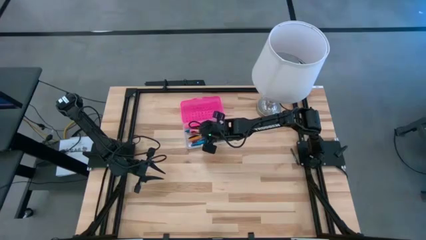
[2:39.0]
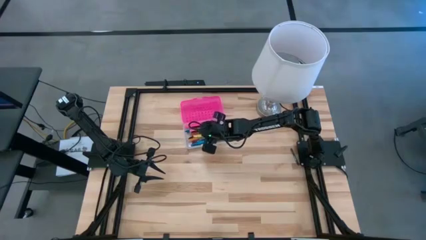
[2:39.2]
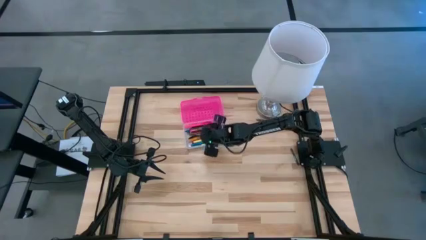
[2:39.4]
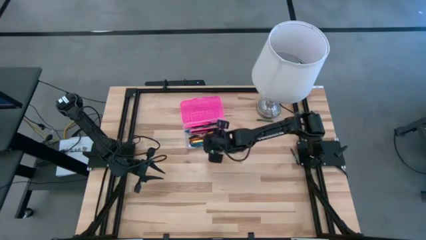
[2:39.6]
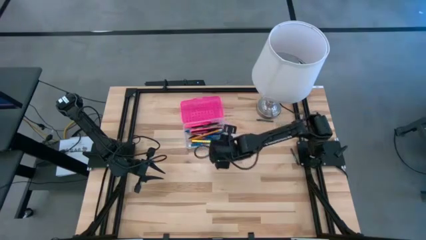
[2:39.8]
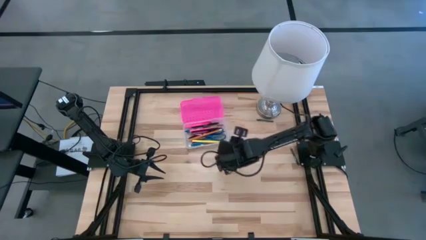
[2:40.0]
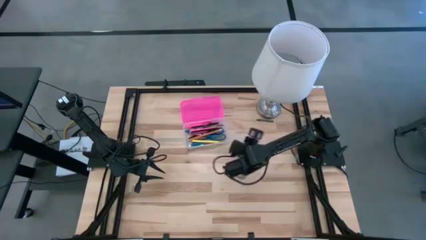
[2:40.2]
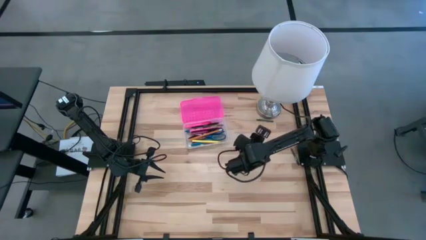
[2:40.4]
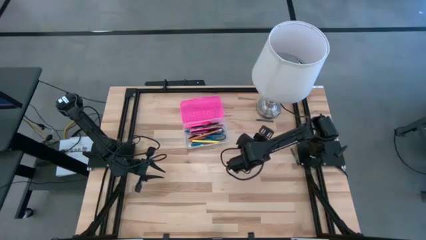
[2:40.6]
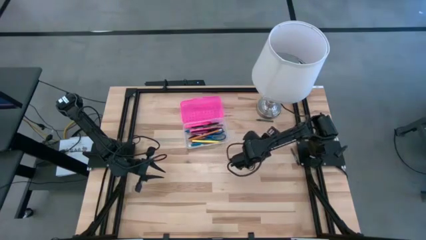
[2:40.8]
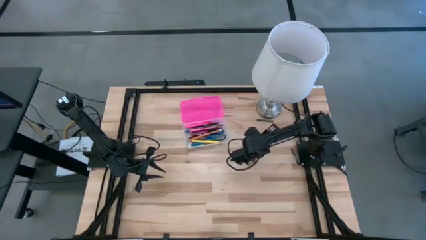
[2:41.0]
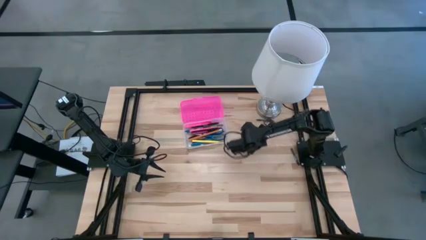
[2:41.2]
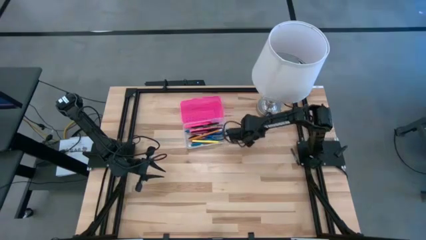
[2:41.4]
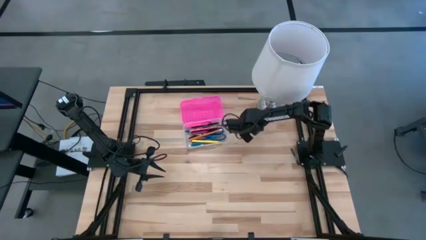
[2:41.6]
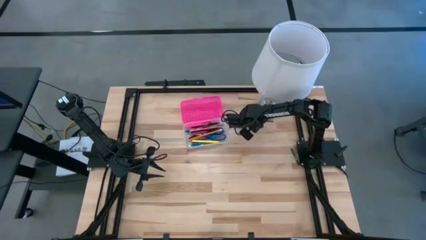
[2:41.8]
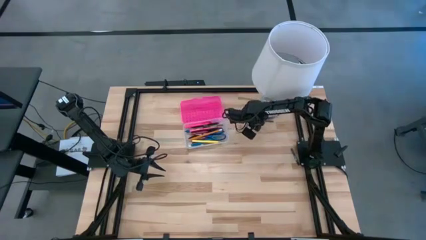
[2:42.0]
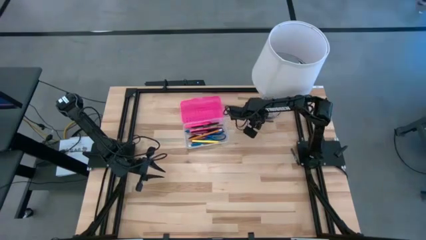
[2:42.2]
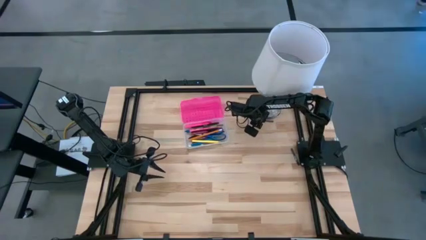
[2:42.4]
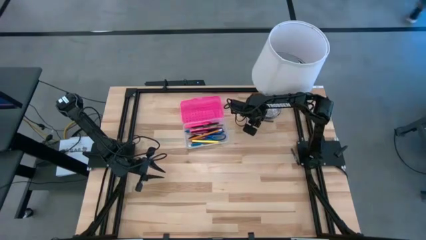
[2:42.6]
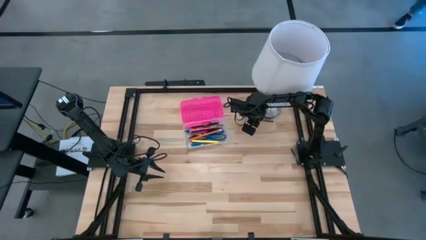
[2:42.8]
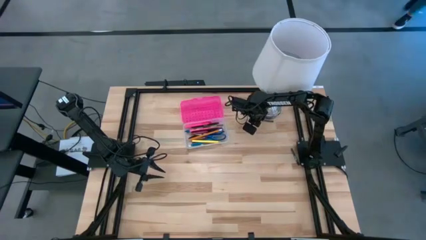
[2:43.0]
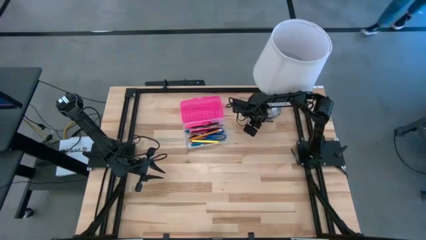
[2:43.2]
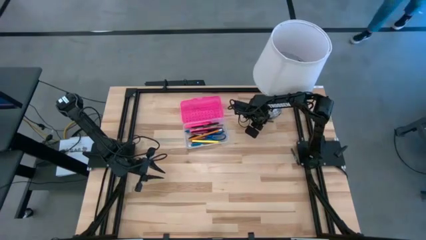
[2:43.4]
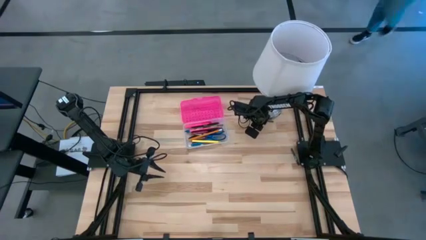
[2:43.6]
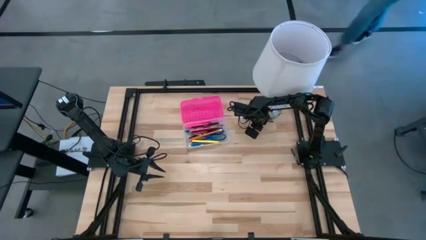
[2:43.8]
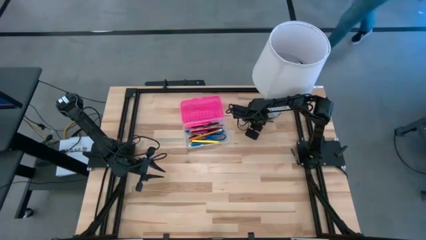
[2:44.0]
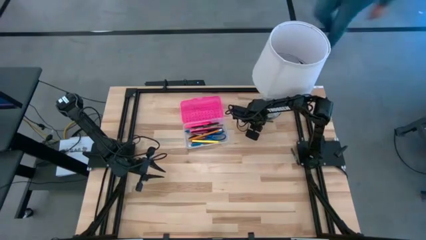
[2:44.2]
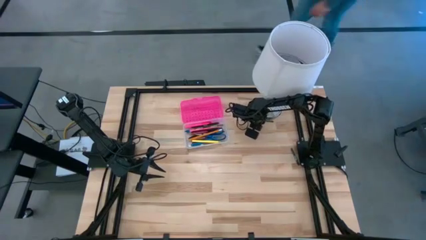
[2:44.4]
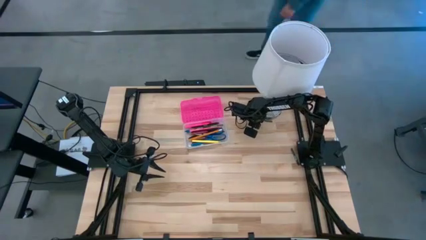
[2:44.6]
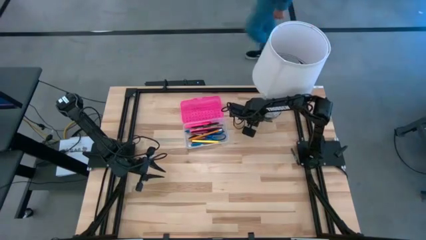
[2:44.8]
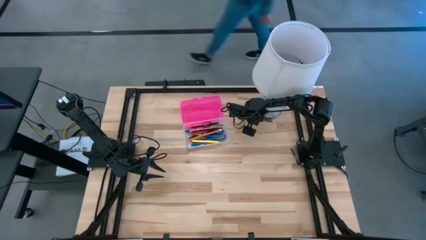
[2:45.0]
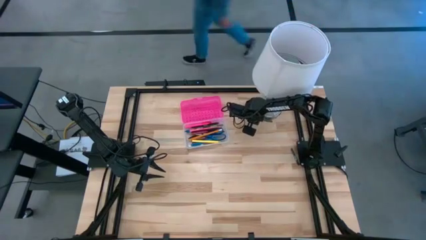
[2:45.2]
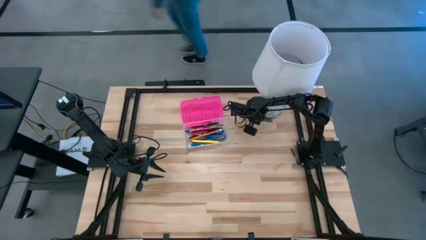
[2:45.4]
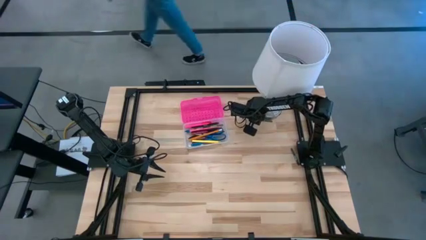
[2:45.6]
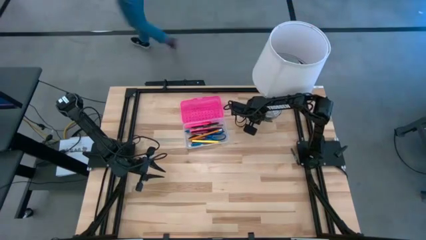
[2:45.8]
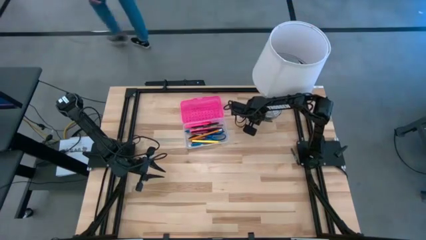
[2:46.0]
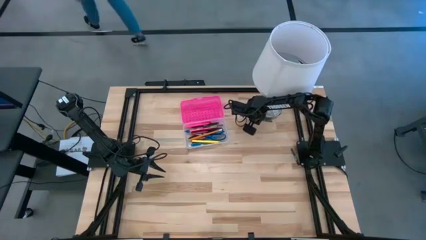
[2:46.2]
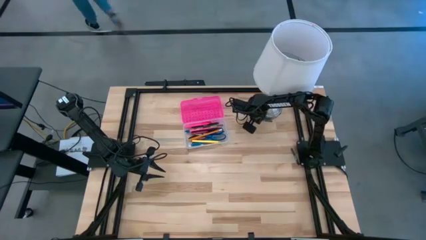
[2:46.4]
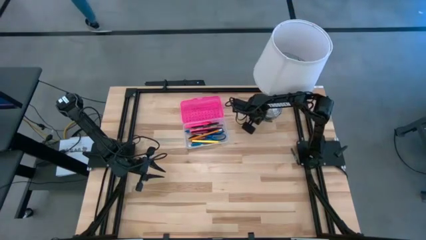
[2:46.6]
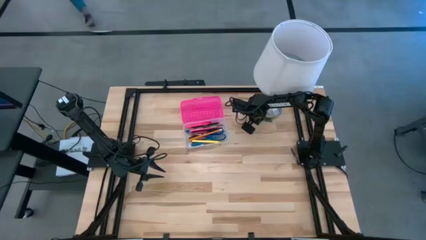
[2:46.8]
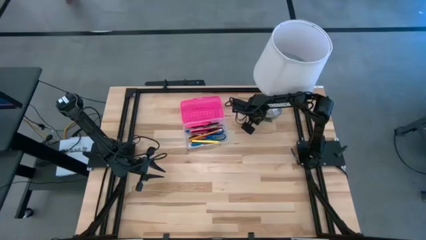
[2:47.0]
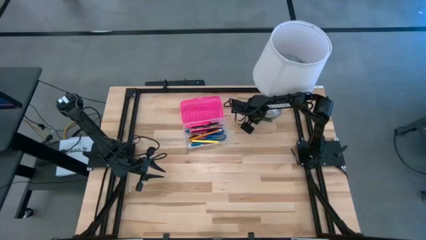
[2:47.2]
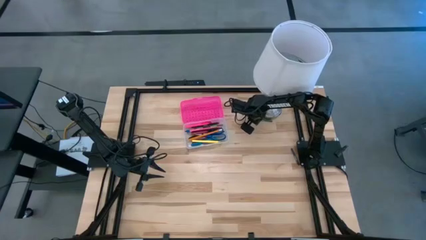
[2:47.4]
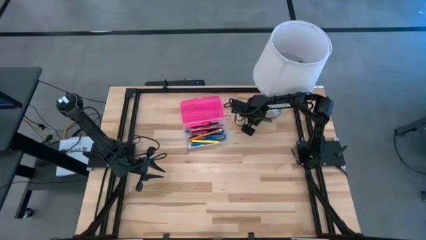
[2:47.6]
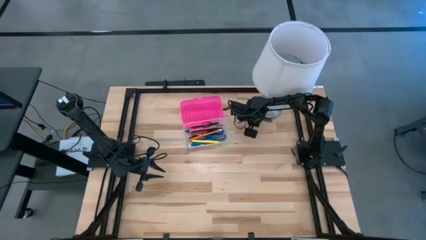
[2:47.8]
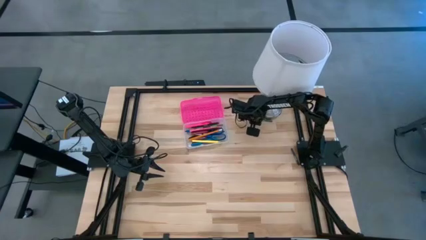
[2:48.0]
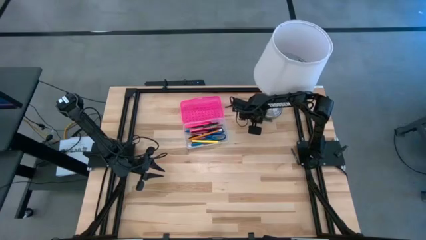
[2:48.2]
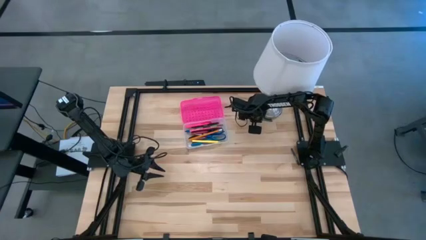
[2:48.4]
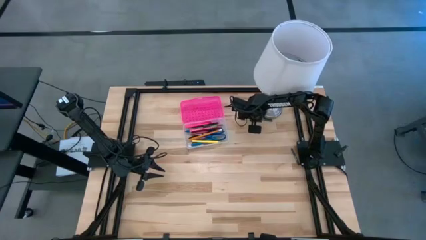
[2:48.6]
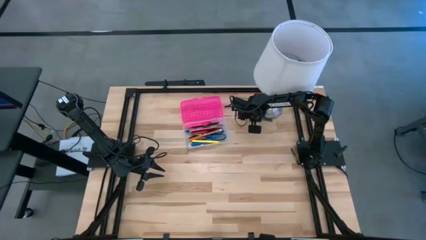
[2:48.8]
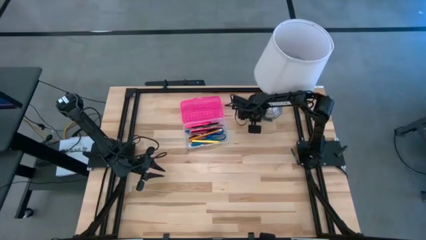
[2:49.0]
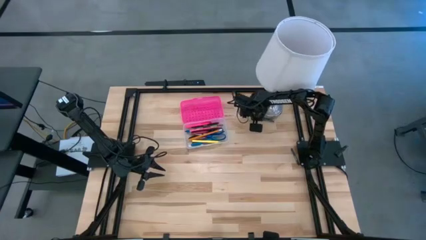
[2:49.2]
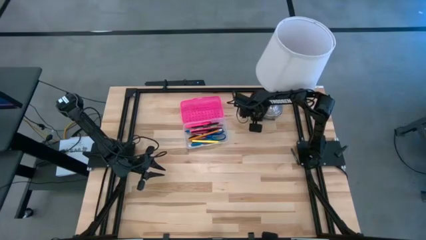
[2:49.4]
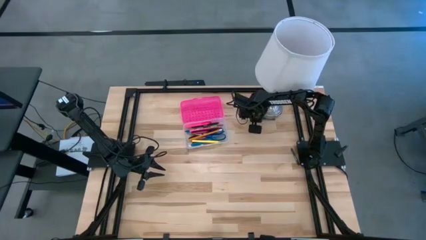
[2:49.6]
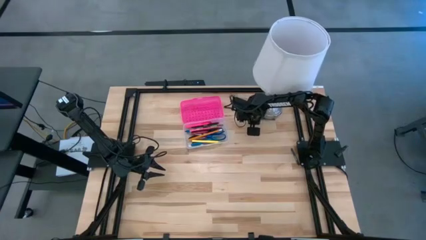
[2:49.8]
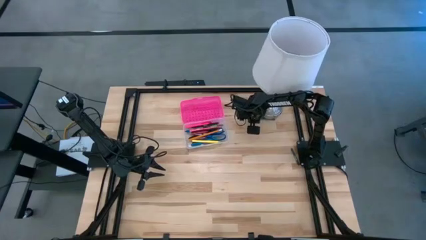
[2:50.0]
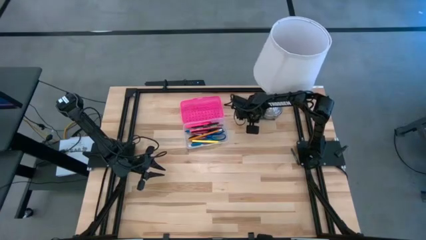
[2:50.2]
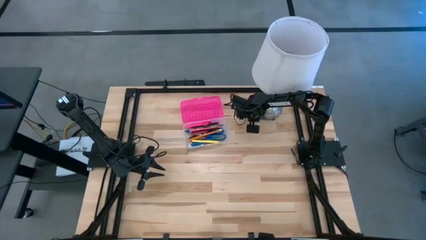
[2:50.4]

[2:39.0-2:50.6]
Task: Pick & place school supplies into a supply box
Put the green crayon into the pink supply box

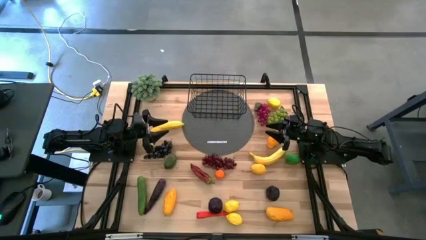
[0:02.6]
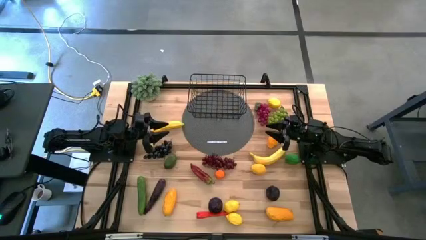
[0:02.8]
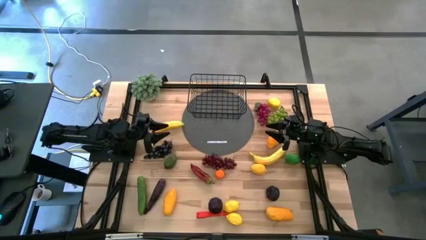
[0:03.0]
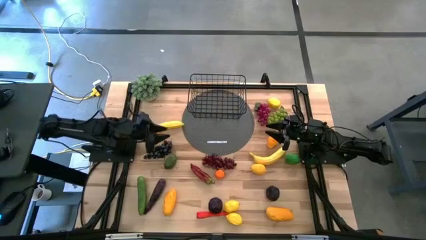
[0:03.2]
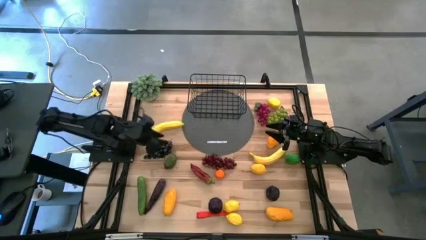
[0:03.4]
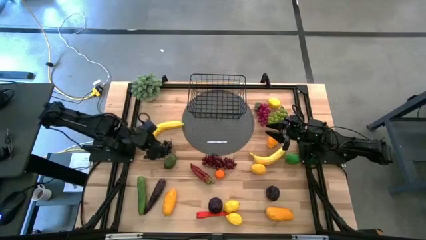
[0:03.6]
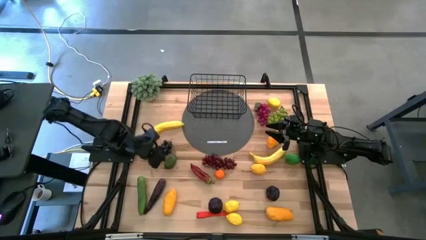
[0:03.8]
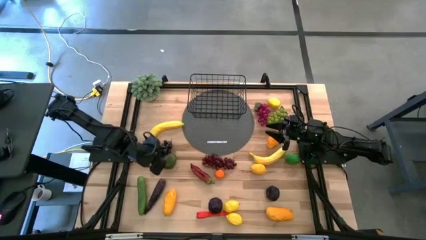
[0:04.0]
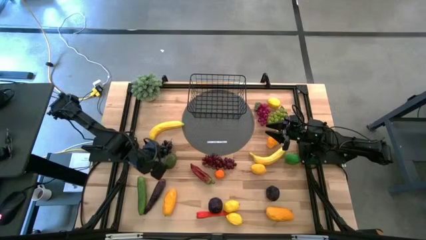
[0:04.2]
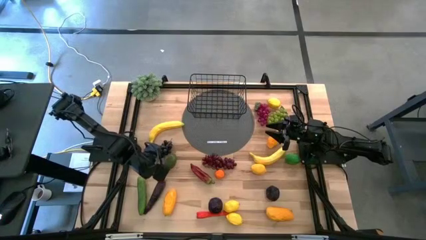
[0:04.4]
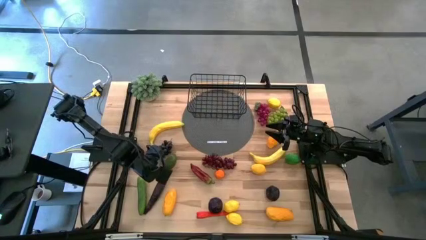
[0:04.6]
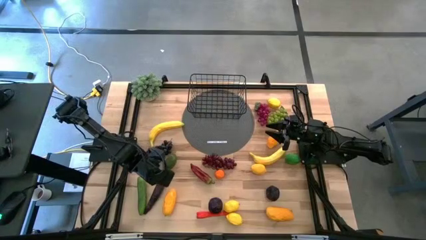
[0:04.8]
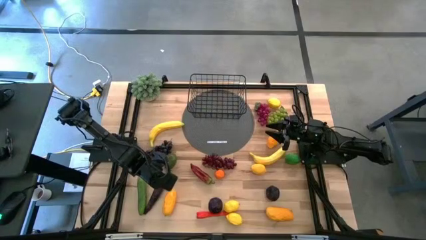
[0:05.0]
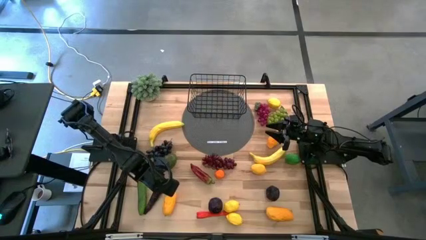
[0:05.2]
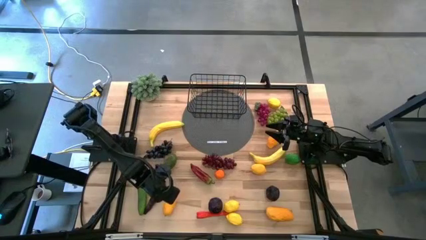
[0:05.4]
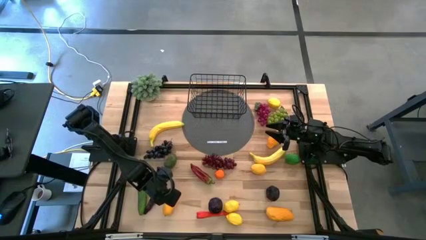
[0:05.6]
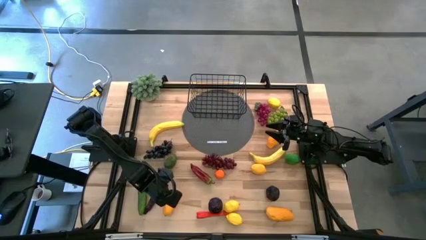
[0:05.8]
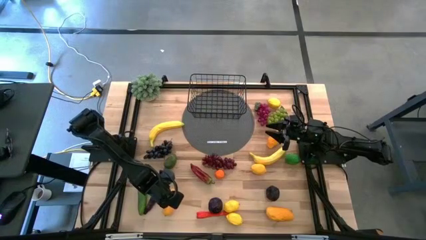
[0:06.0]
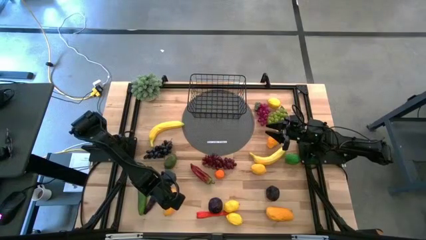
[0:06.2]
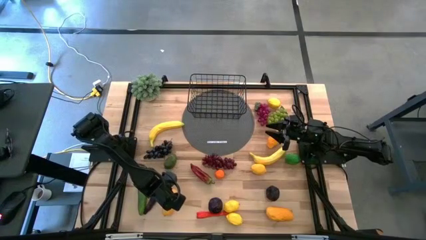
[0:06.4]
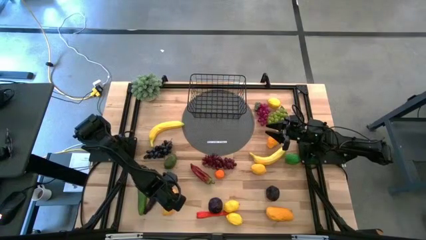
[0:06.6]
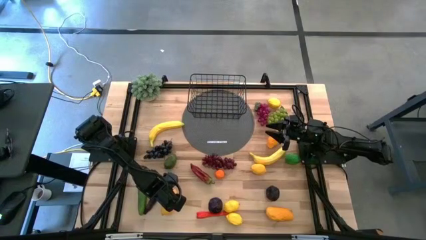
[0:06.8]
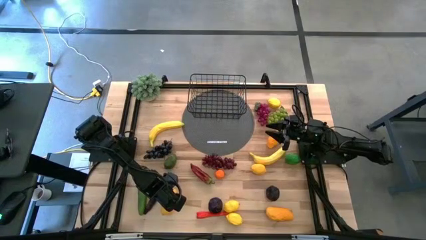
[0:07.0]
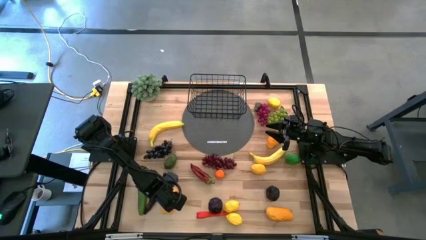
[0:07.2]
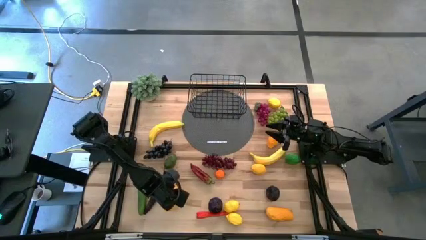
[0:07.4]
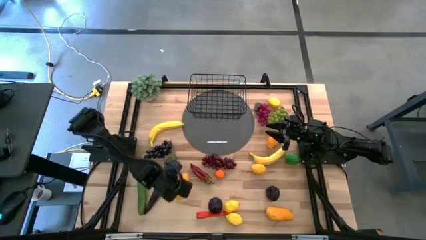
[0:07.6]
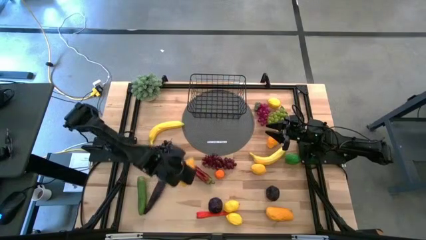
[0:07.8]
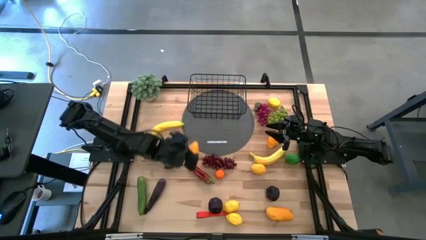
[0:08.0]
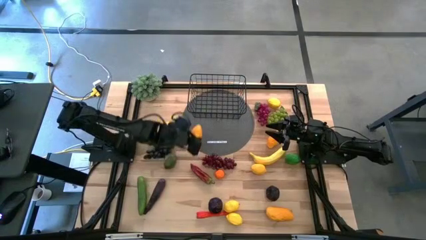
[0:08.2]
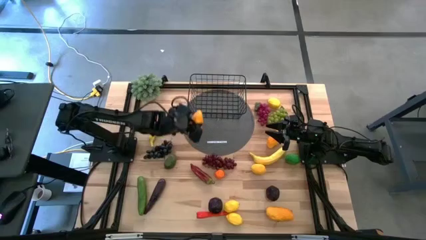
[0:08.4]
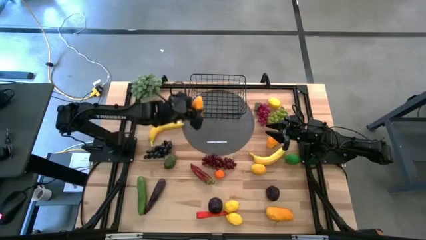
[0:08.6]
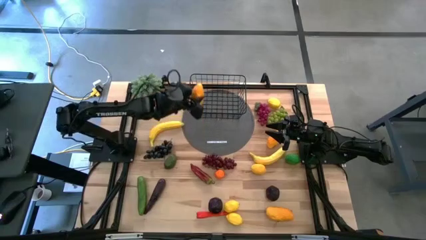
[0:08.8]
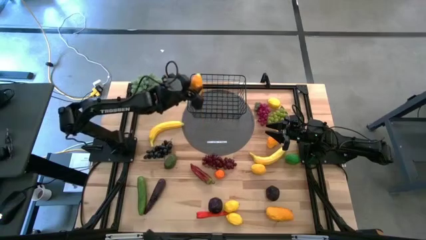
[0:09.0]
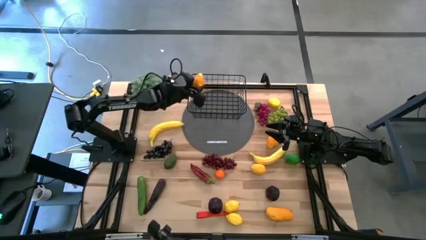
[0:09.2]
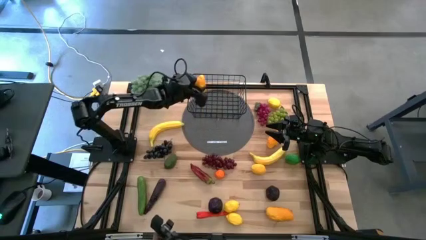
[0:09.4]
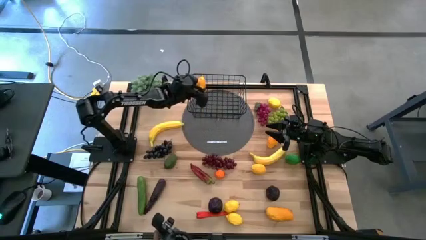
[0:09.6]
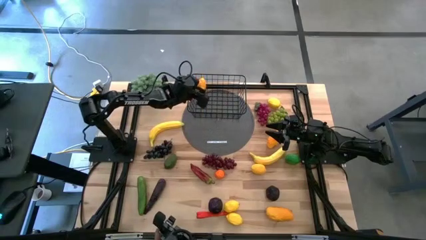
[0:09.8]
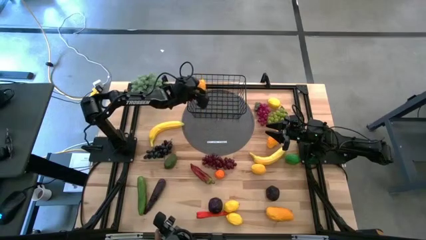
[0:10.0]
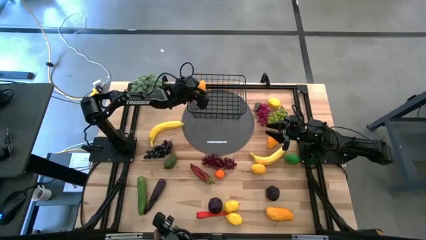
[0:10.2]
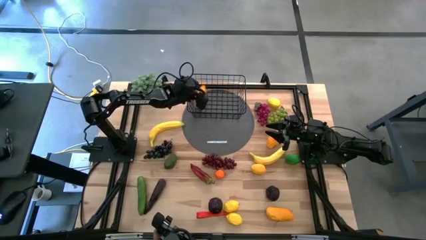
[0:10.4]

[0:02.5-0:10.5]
Task: Build produce basket
Put the bottom left yellow mango into the black wire basket
